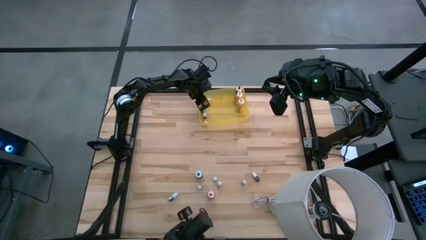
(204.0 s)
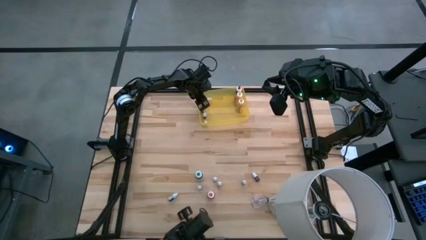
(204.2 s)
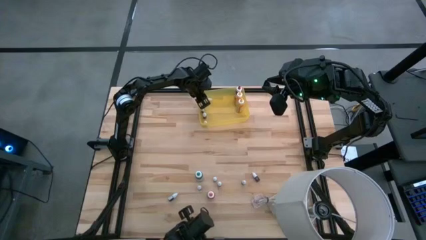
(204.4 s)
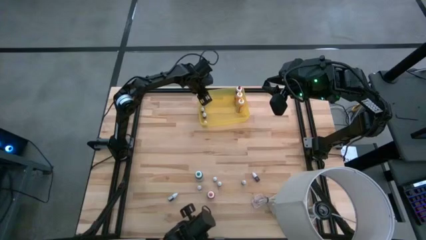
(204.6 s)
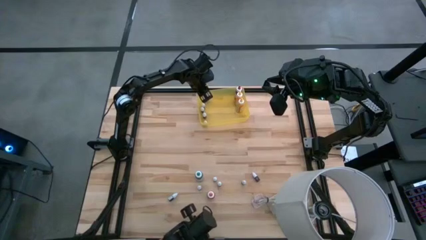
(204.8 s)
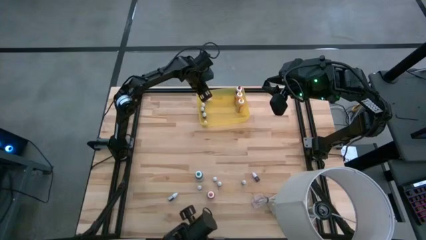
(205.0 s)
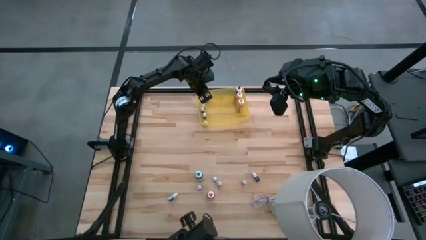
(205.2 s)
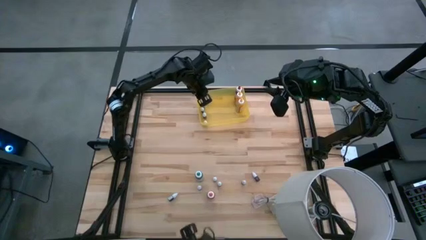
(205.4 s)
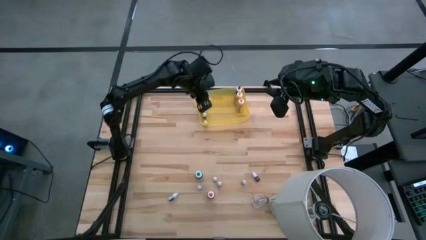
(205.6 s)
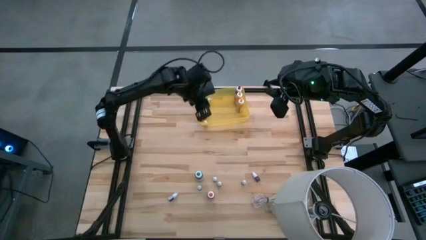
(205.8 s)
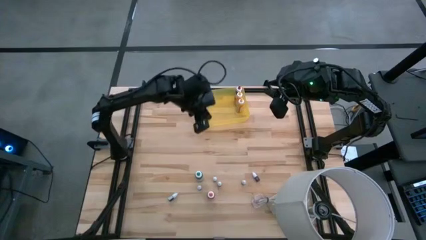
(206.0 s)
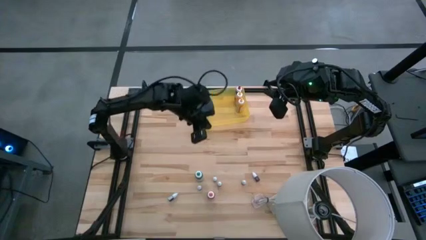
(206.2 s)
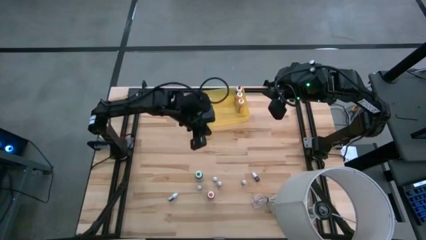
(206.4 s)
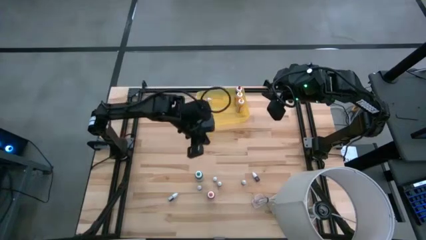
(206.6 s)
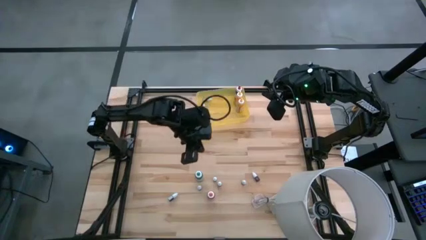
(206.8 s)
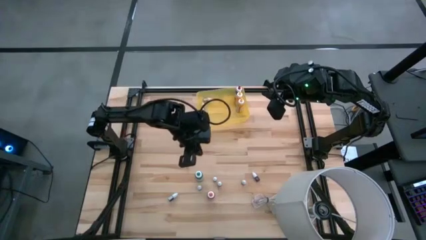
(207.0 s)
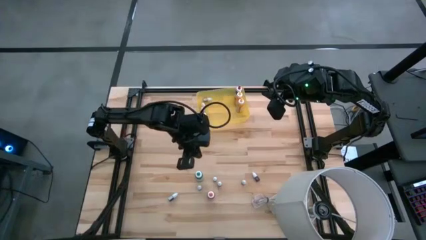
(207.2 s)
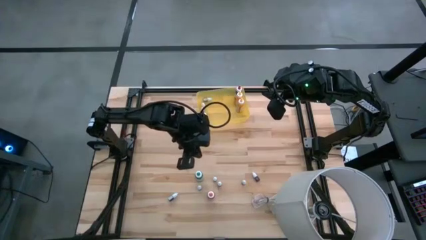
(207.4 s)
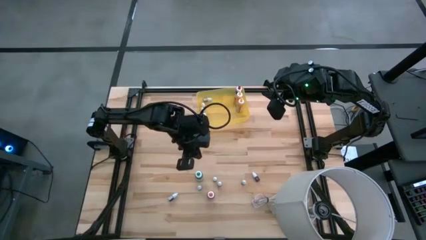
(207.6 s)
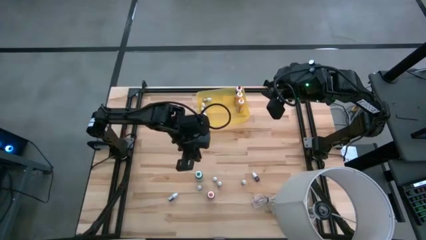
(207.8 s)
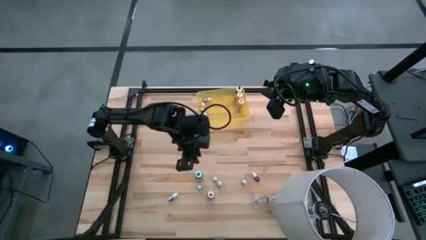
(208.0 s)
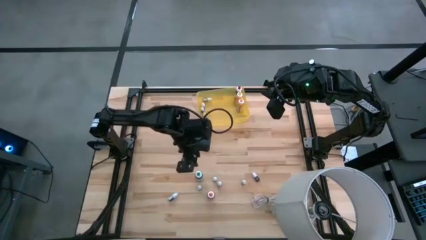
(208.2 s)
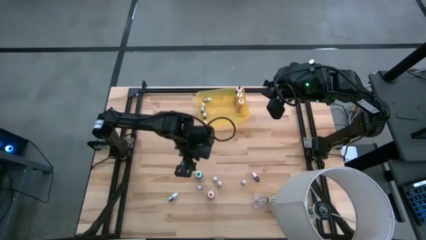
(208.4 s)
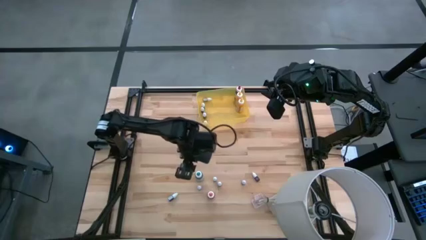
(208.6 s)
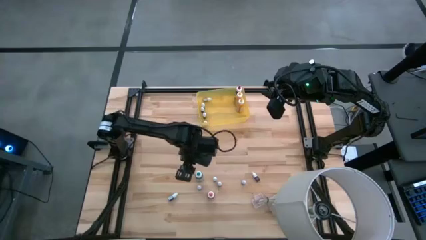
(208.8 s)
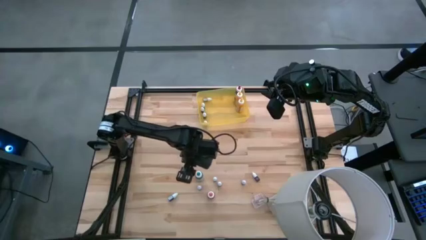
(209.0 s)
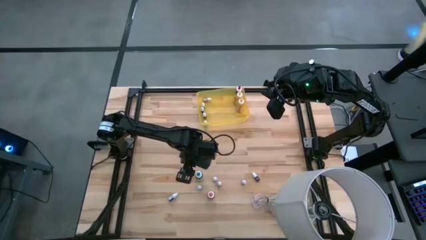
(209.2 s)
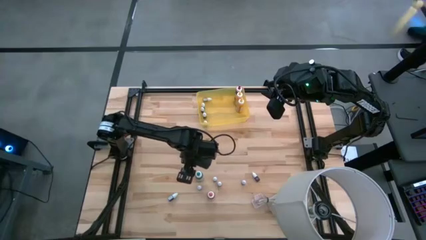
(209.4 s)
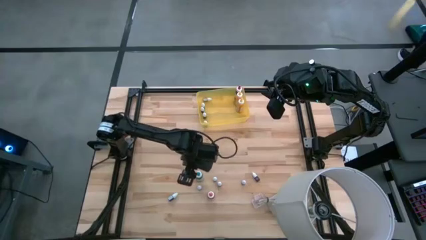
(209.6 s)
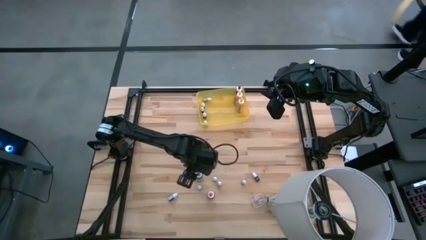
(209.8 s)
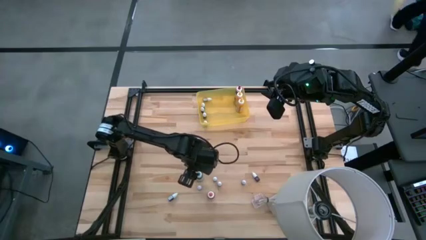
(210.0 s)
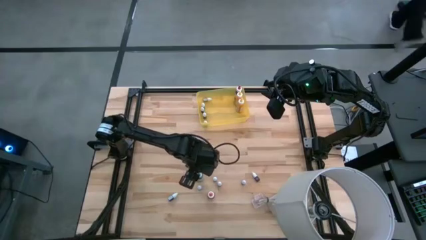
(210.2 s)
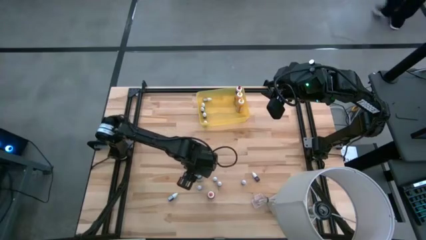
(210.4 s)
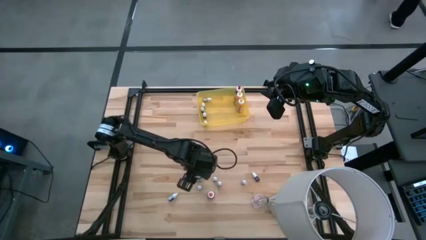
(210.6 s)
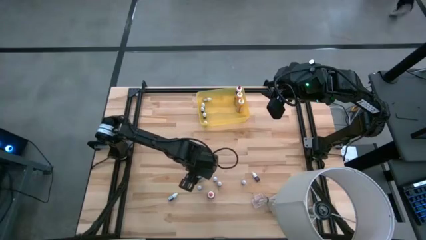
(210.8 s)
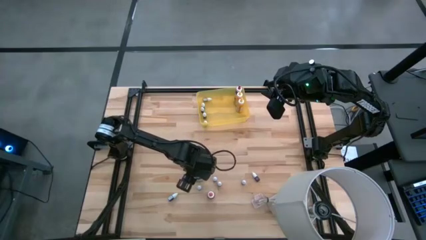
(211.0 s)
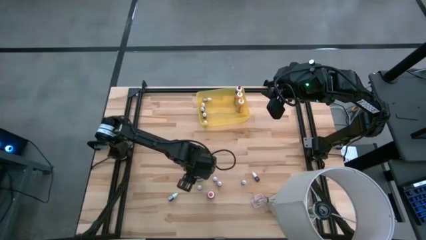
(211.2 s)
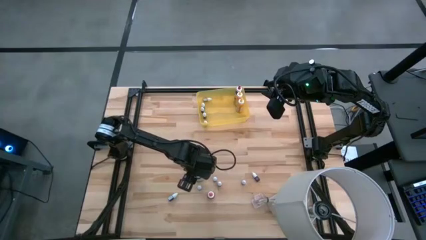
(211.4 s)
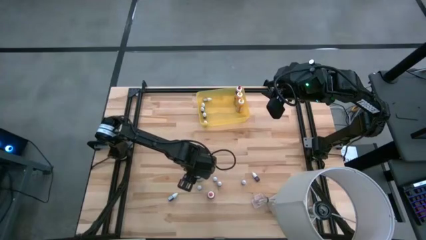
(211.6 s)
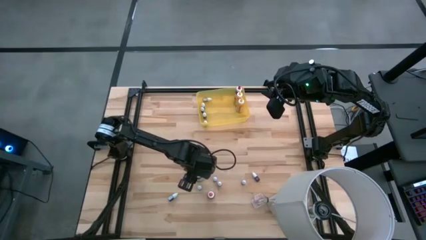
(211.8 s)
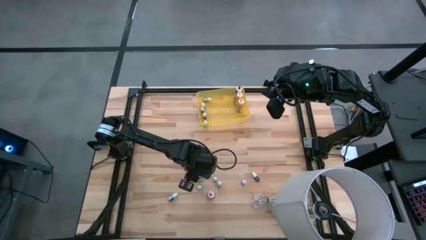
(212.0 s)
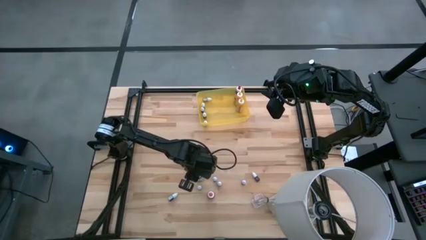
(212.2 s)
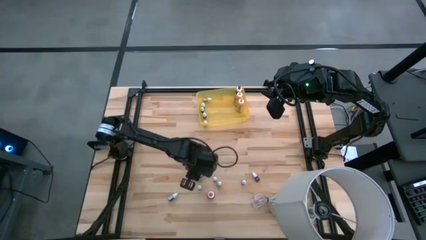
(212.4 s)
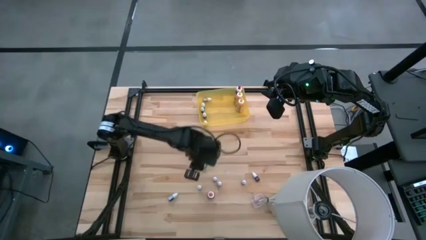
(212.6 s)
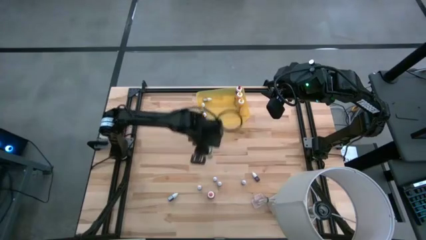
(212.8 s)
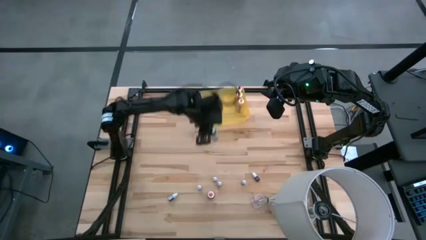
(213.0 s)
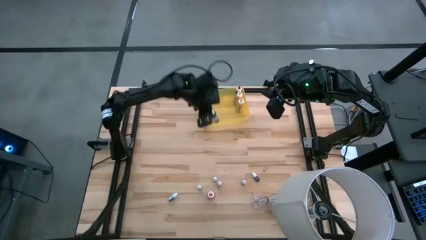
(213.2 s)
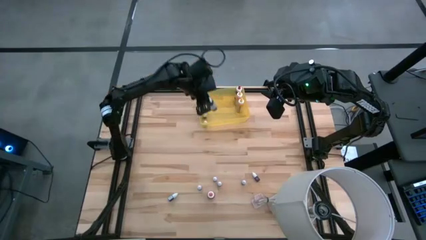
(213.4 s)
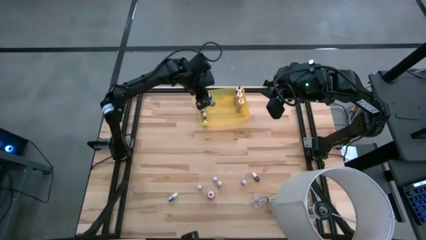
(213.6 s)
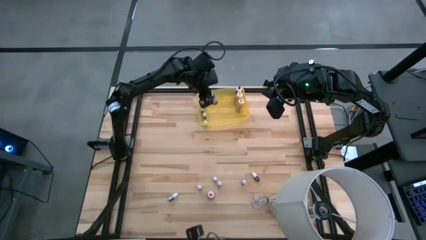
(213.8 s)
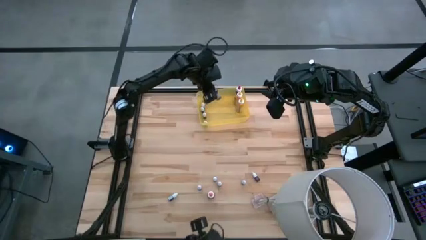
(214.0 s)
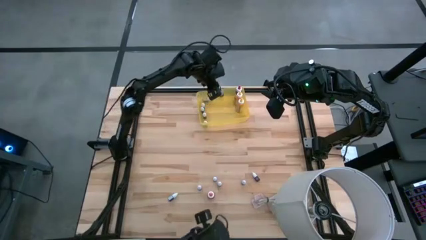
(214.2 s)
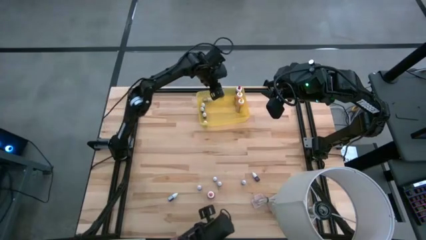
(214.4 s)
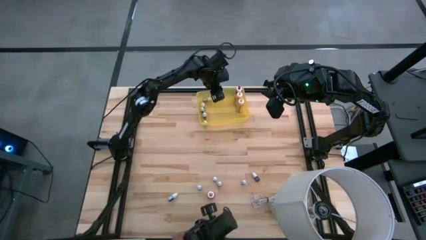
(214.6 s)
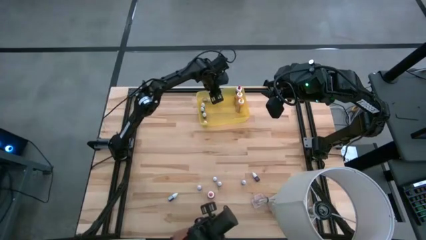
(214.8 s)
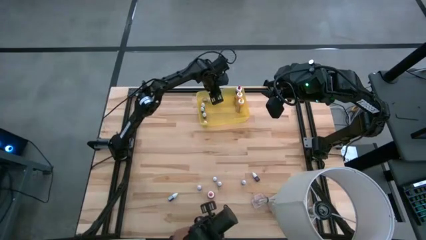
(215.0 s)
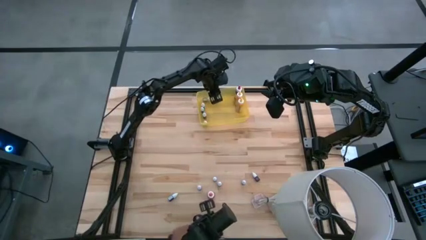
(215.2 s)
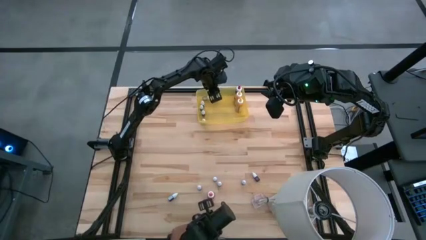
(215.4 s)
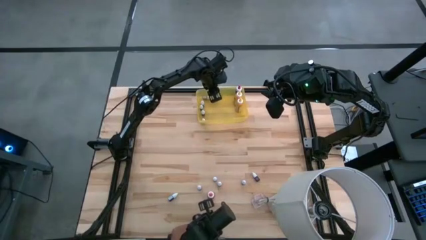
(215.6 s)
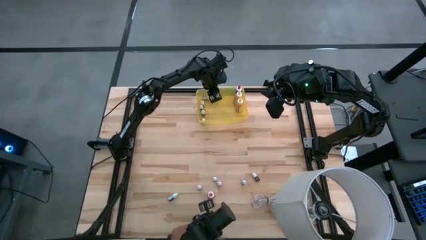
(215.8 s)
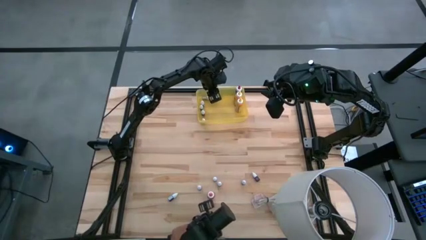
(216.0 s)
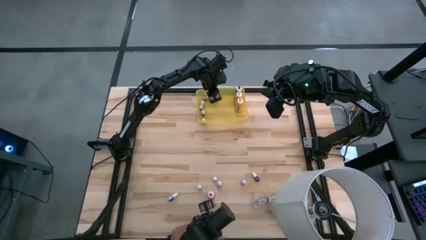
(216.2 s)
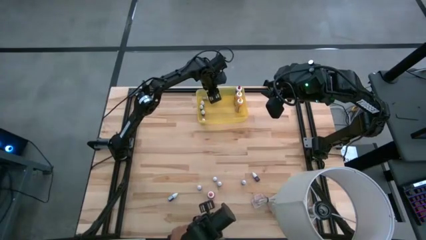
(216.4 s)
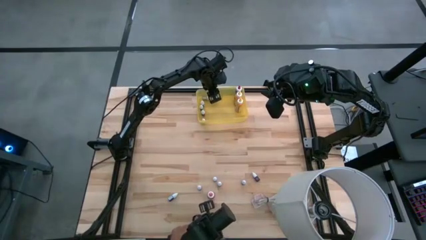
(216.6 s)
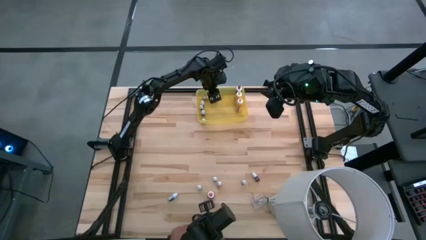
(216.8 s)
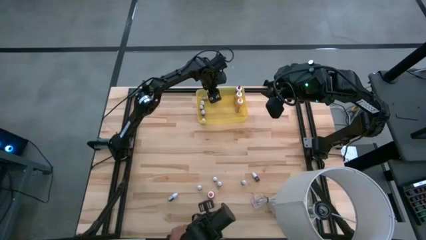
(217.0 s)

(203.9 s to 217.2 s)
Task: Pick & Place food coloring
Put the large green food coloring bottle into the yellow bin
